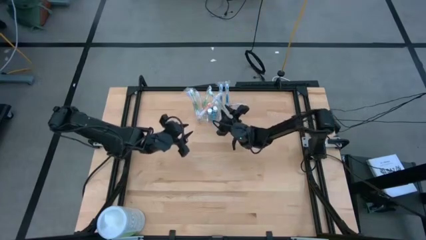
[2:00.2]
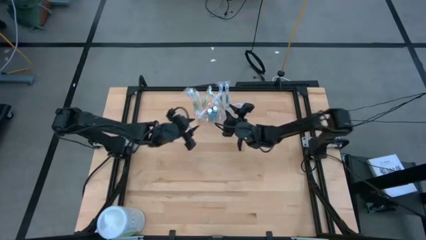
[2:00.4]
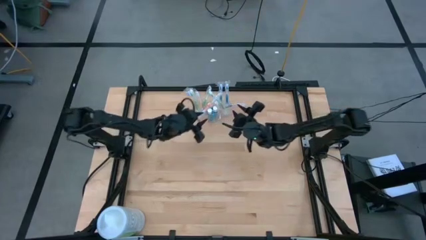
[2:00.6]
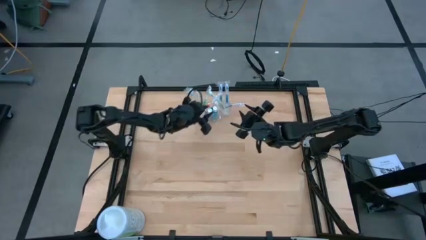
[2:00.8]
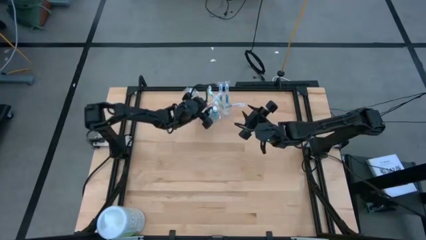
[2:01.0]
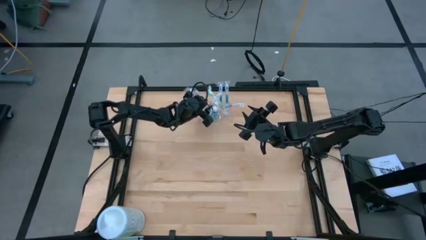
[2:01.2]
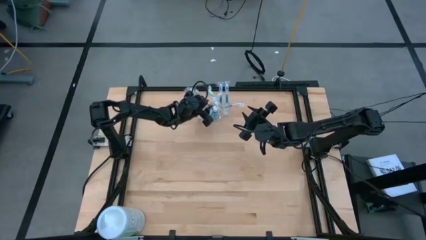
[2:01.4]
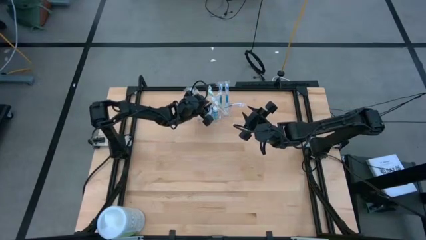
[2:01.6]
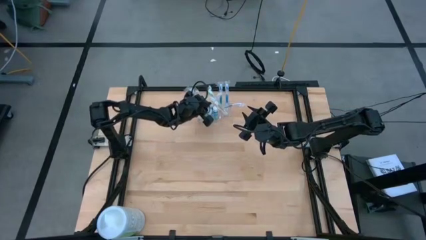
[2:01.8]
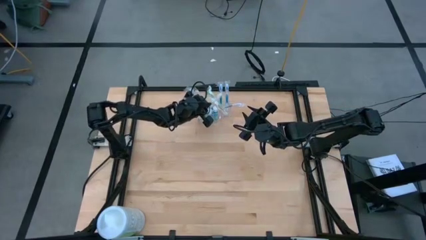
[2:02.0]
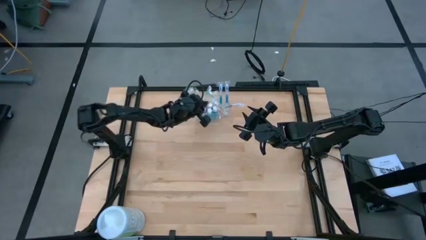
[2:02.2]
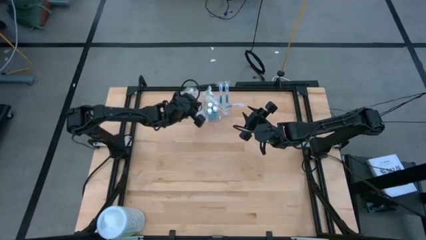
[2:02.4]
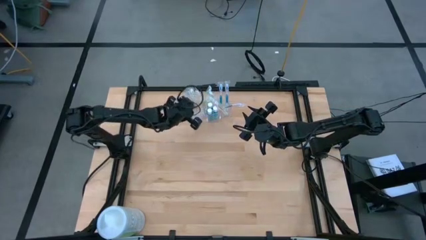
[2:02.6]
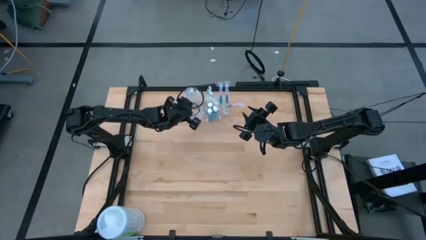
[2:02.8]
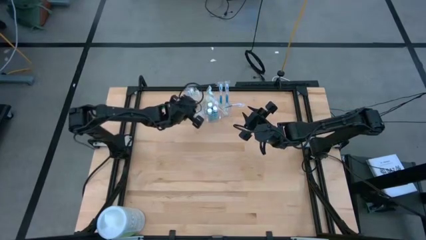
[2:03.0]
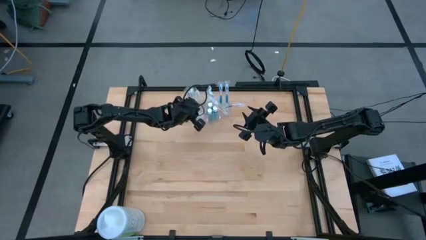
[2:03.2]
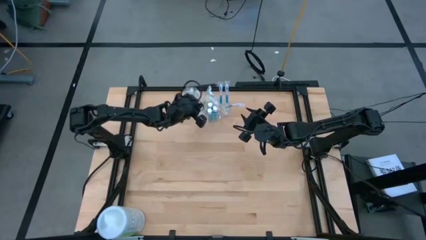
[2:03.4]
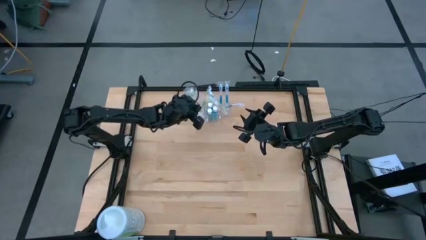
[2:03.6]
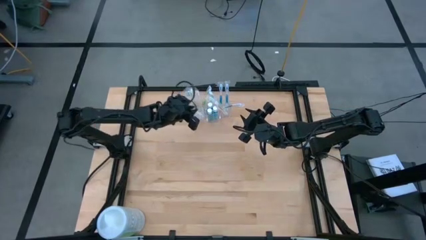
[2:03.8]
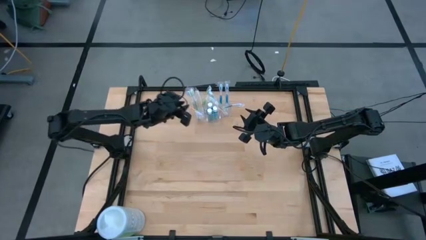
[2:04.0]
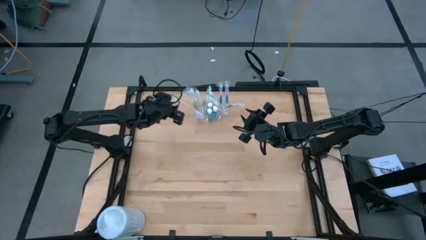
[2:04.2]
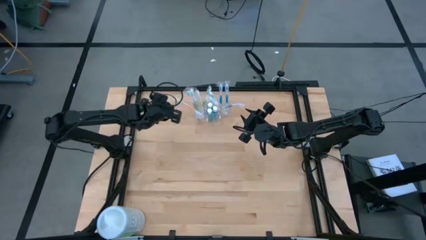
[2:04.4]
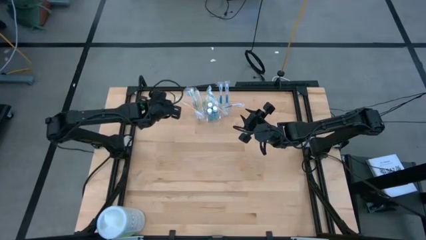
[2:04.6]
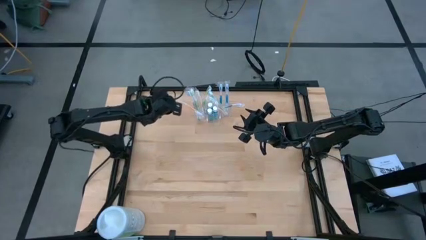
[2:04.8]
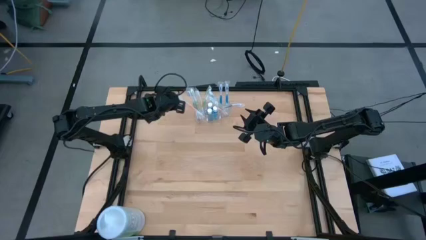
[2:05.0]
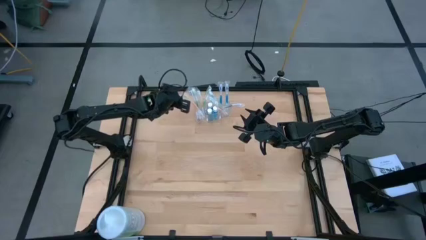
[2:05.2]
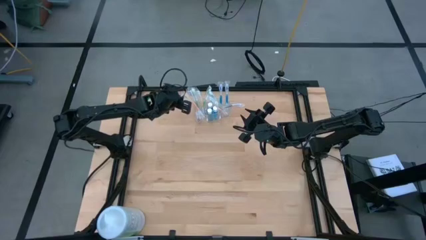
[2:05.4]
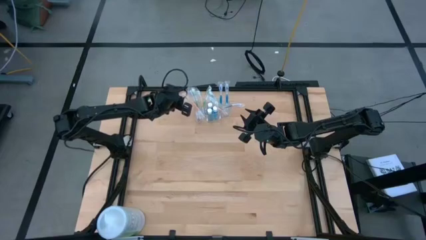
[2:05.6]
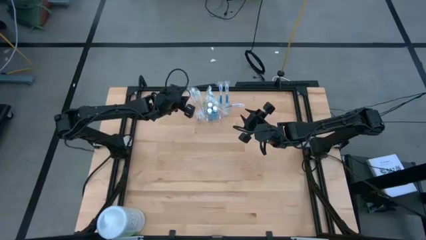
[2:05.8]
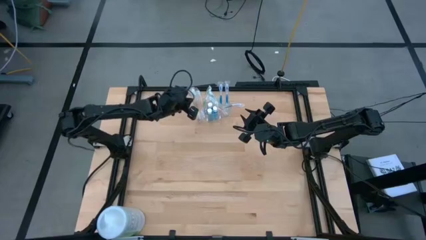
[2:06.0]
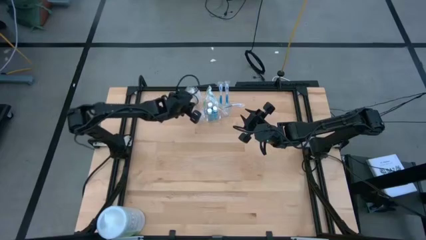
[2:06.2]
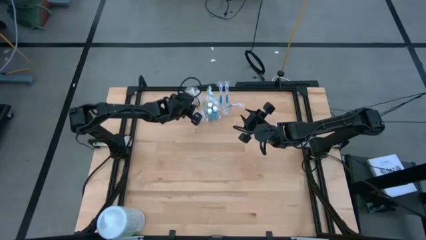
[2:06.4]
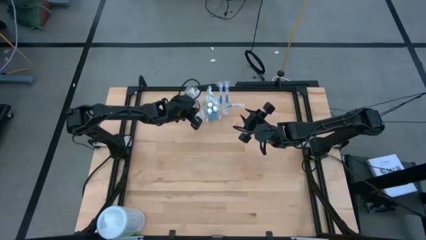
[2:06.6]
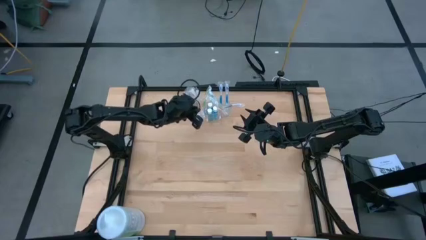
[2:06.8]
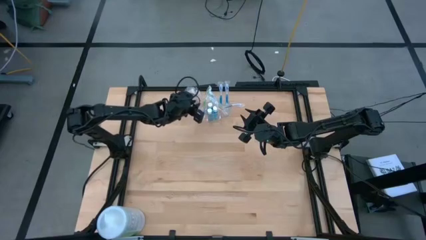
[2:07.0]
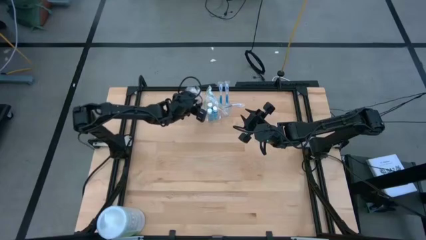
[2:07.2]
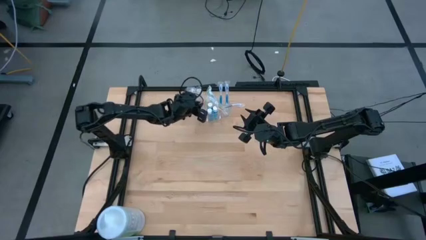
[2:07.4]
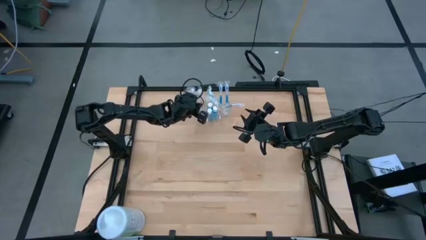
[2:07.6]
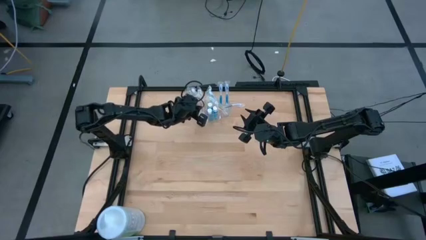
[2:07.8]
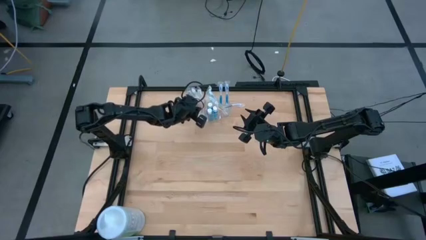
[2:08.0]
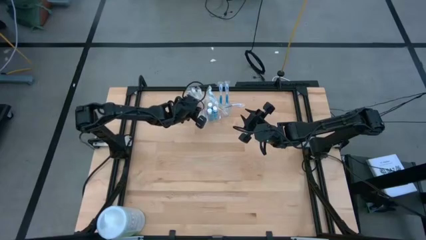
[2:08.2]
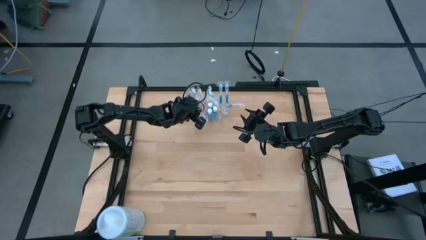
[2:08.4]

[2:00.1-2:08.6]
Task: Pick & Place toothbrushing station
Adjust the orange toothbrush

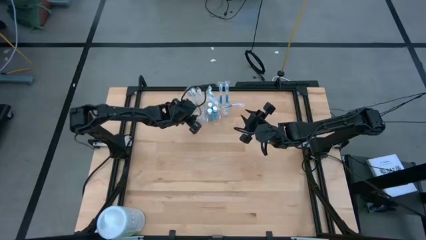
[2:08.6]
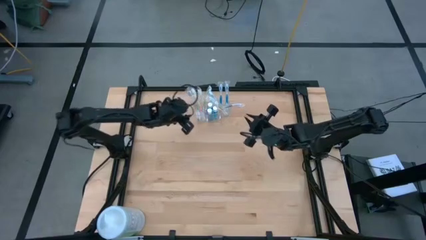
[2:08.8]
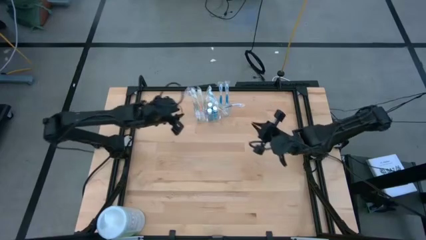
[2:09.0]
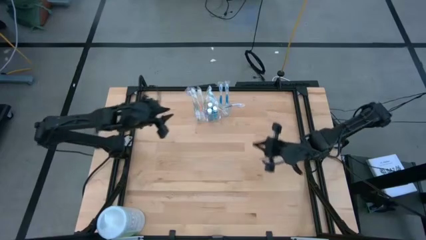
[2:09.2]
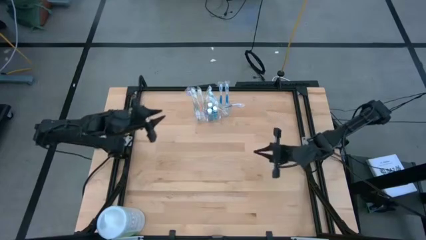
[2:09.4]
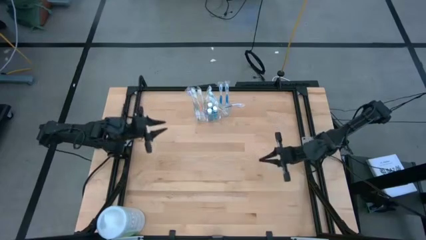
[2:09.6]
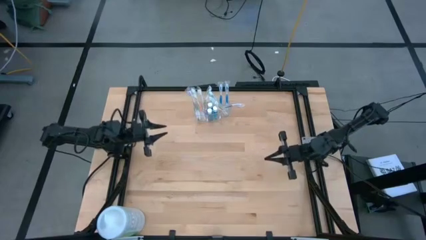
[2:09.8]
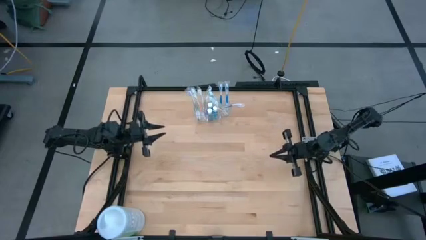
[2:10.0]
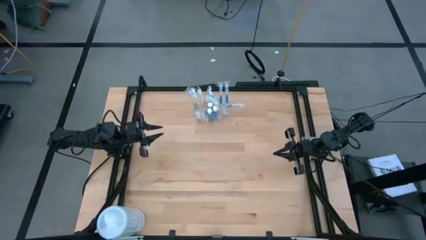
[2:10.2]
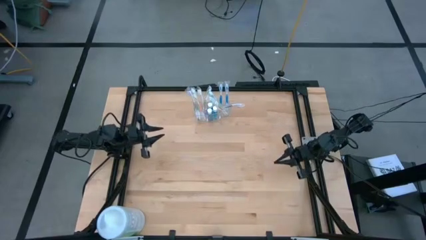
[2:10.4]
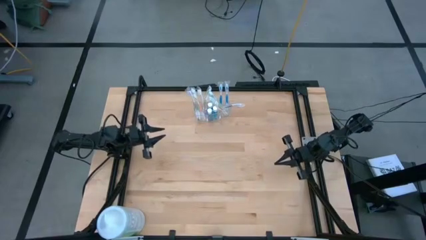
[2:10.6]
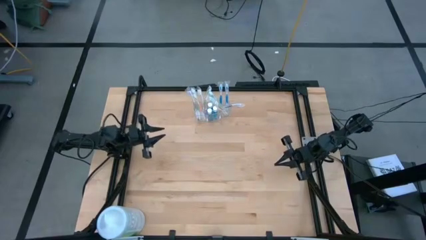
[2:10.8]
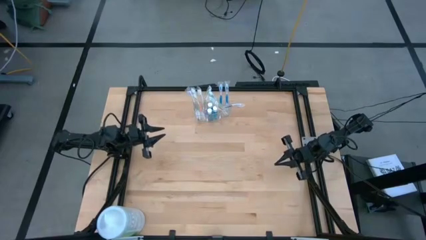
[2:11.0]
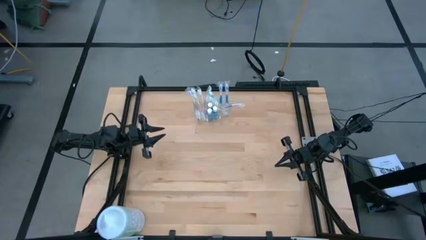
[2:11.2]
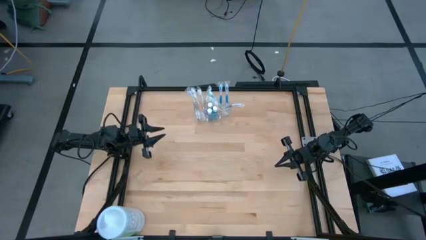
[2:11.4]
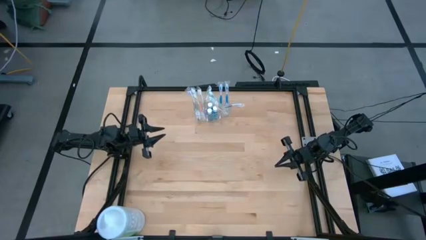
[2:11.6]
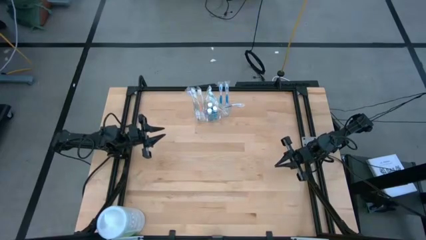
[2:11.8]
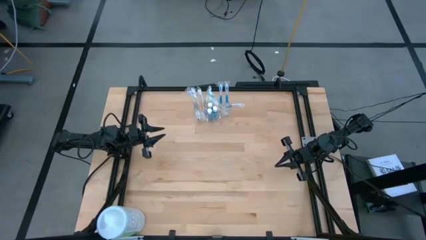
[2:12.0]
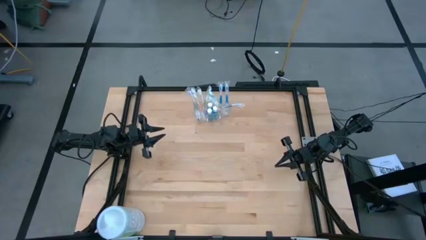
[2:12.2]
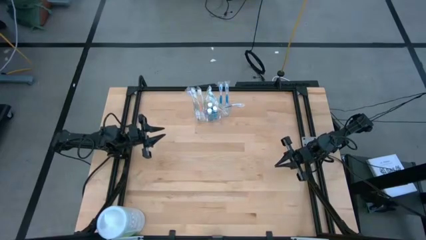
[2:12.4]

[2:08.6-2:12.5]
Return To Home Position

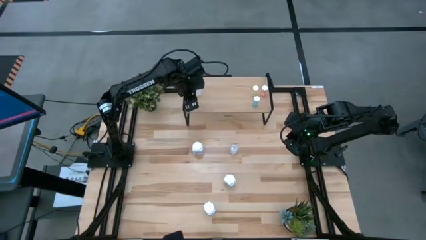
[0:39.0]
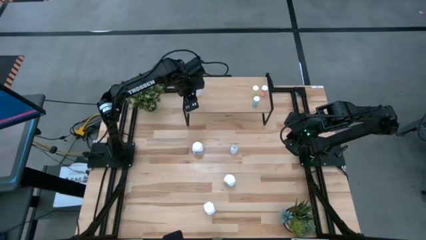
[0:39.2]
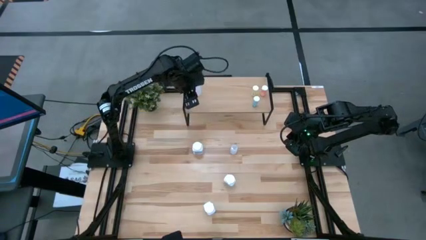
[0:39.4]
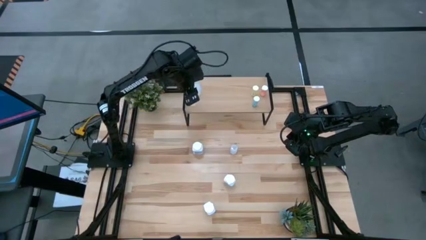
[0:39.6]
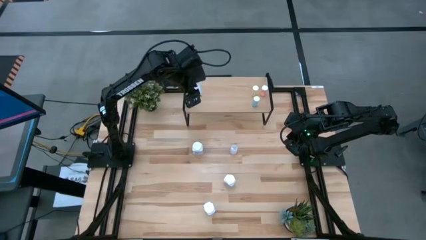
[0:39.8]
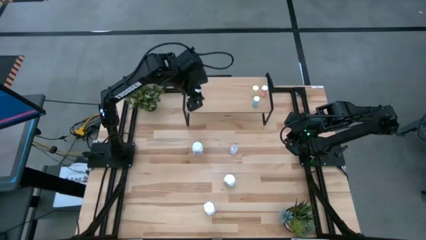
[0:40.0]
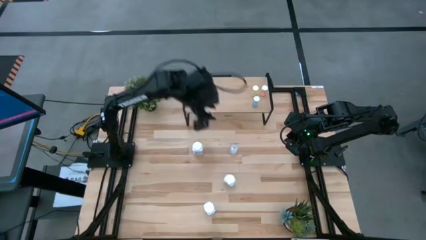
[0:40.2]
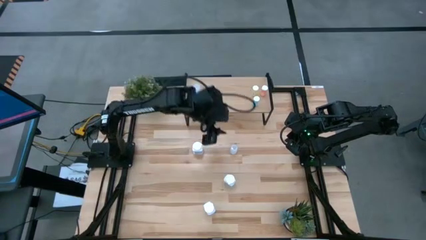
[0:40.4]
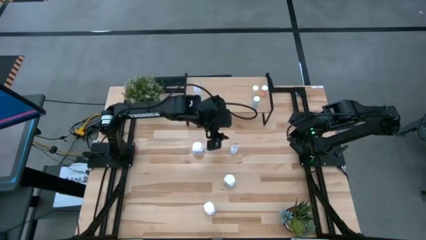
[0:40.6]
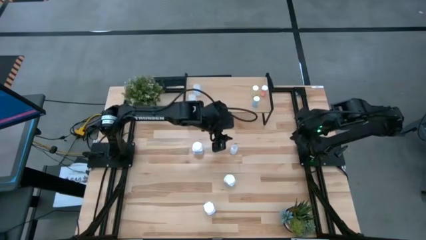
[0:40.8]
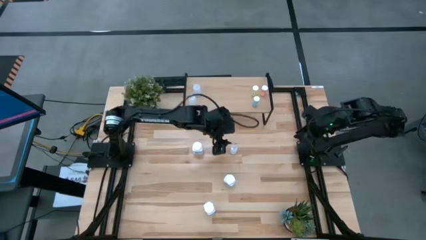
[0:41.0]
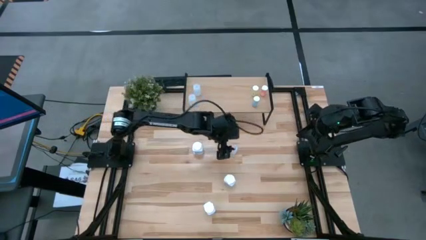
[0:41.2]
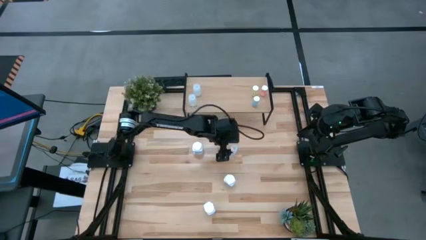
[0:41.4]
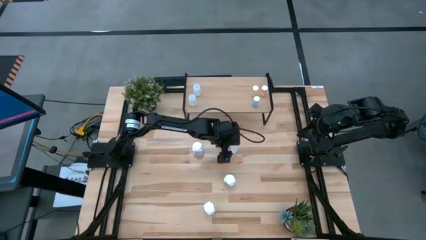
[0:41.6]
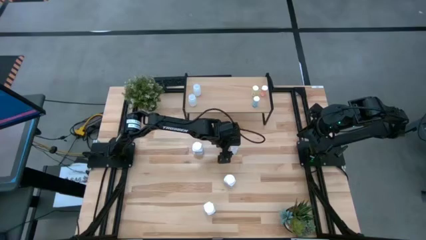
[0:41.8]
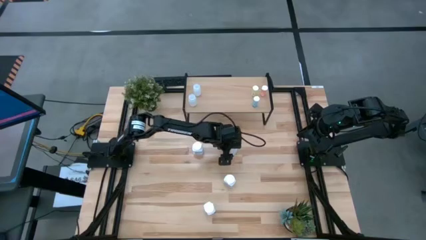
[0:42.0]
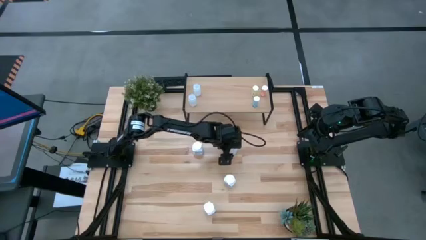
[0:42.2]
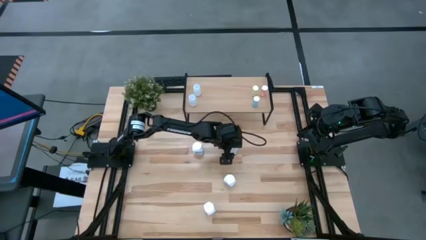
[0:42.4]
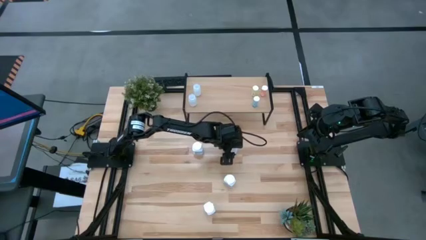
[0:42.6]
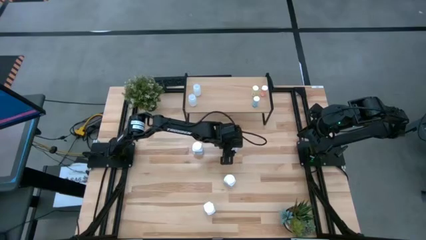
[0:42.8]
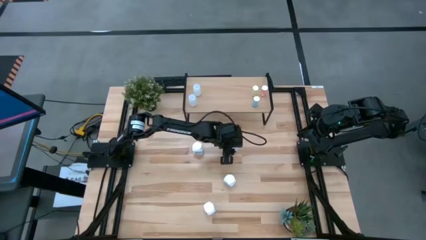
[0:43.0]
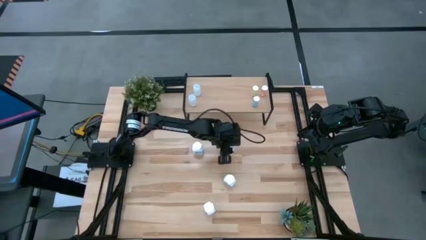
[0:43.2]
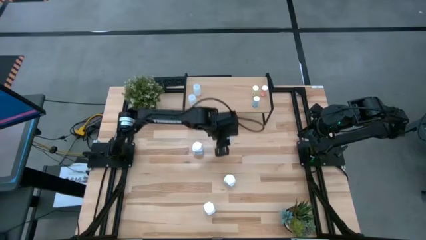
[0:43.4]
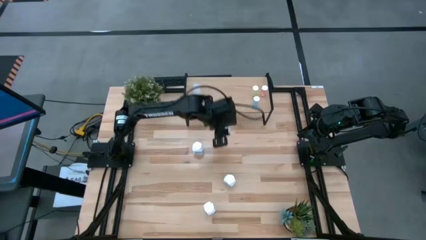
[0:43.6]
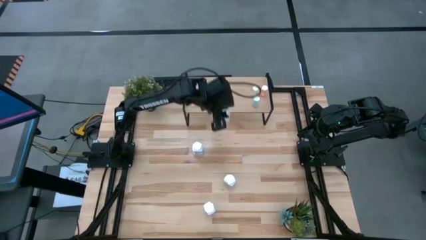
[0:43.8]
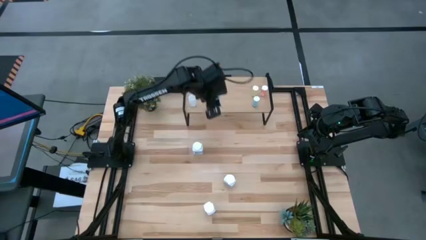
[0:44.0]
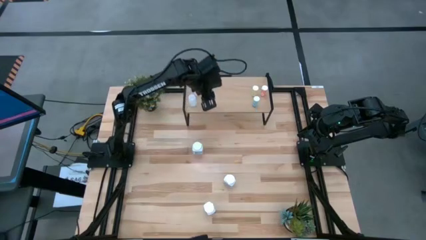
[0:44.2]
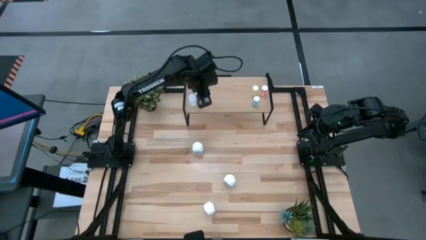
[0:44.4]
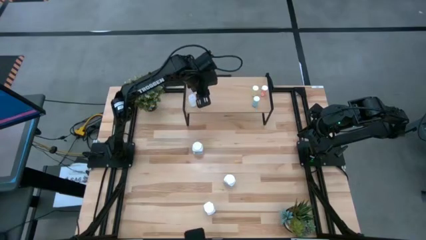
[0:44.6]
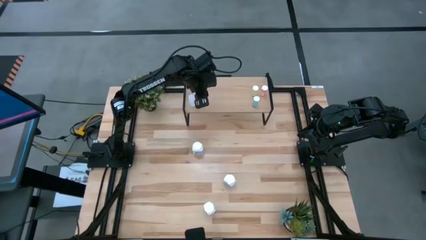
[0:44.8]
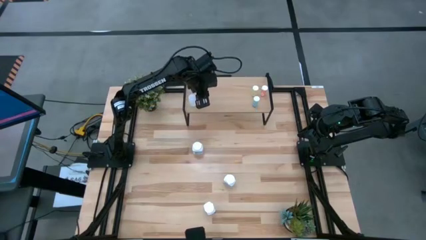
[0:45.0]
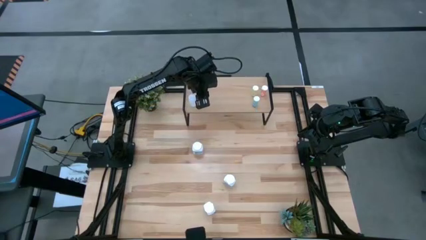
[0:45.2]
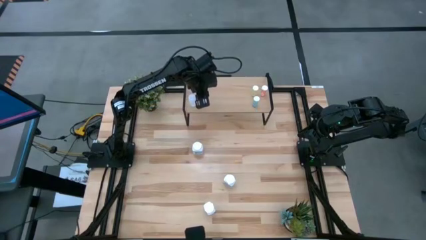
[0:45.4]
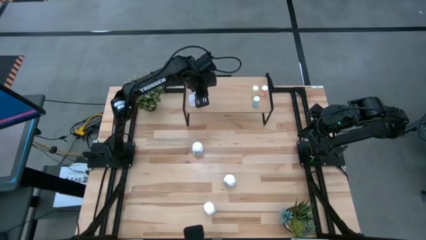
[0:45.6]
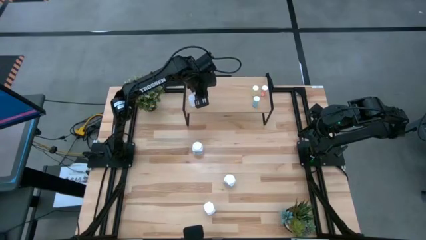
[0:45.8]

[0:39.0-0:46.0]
Task: Pick and place medicine bottles onto shelf by color
Put the transparent pill bottle on the shelf
